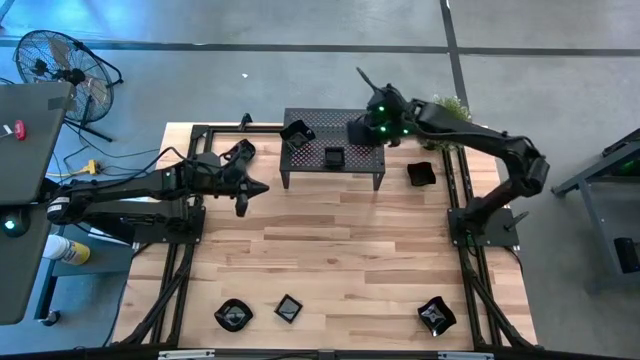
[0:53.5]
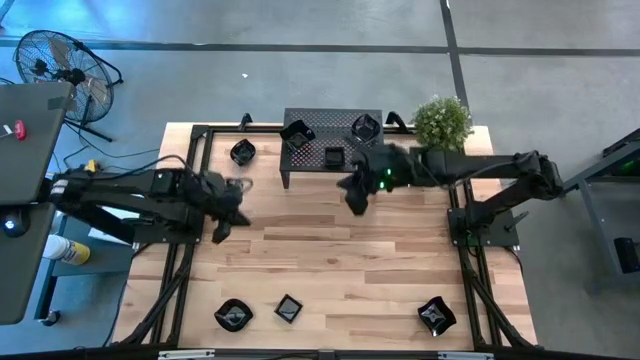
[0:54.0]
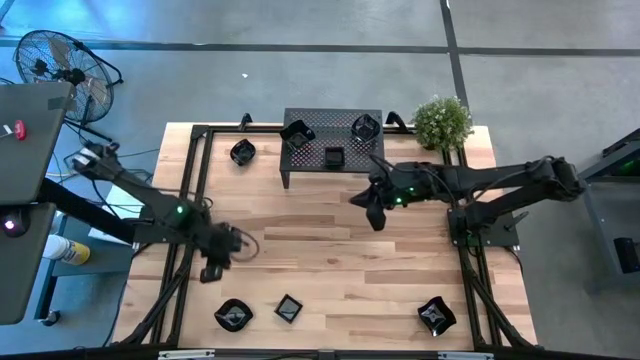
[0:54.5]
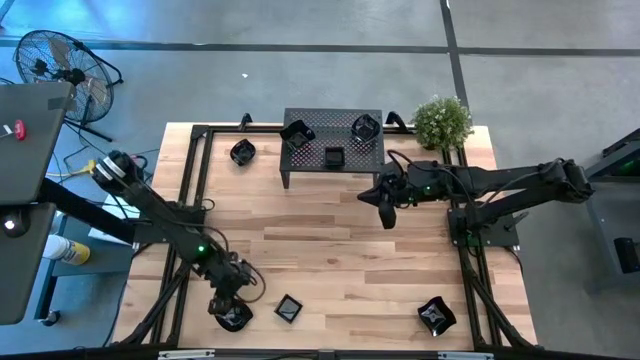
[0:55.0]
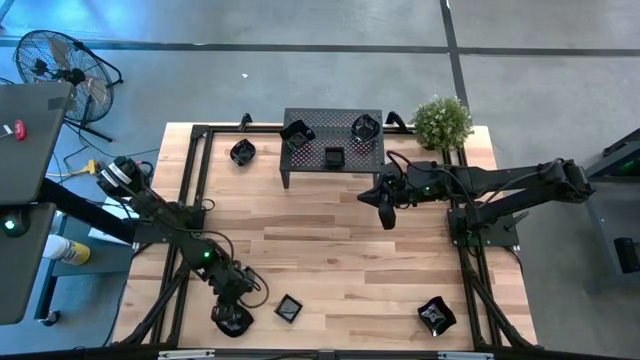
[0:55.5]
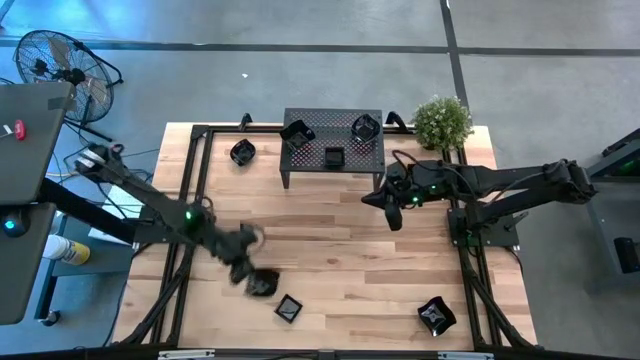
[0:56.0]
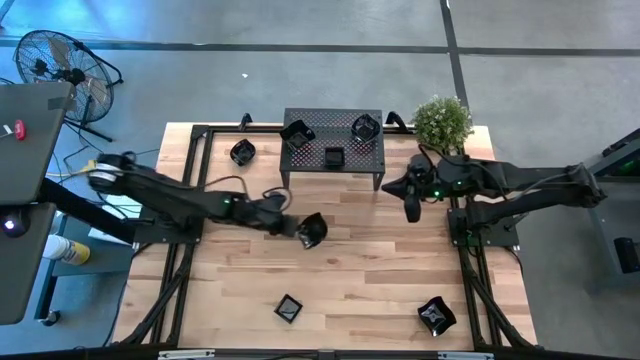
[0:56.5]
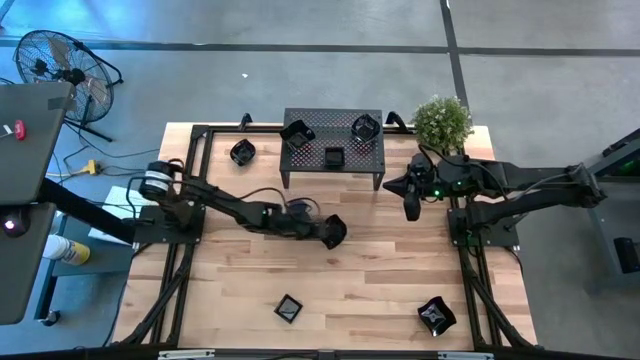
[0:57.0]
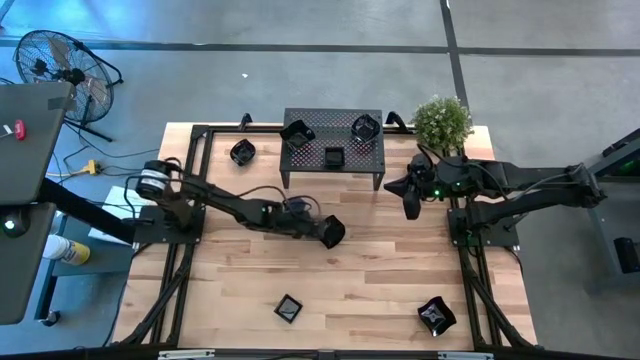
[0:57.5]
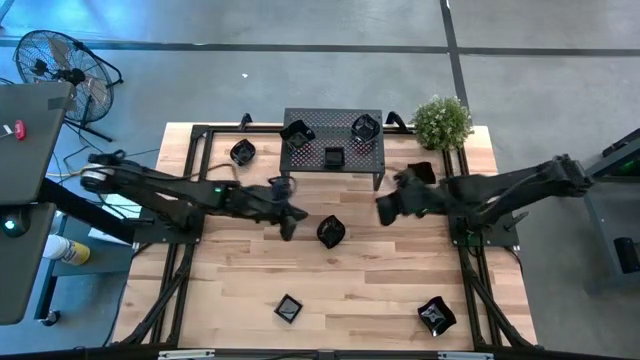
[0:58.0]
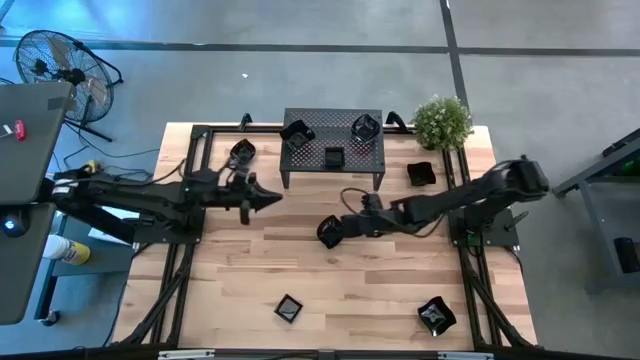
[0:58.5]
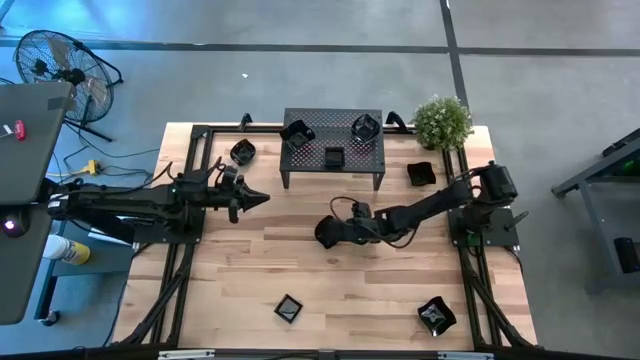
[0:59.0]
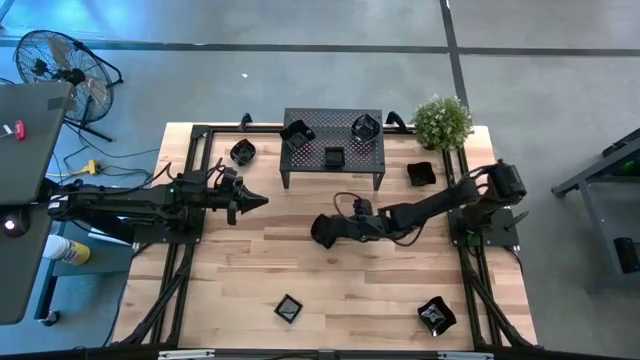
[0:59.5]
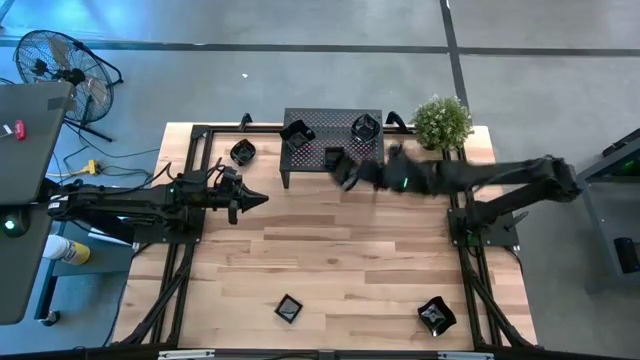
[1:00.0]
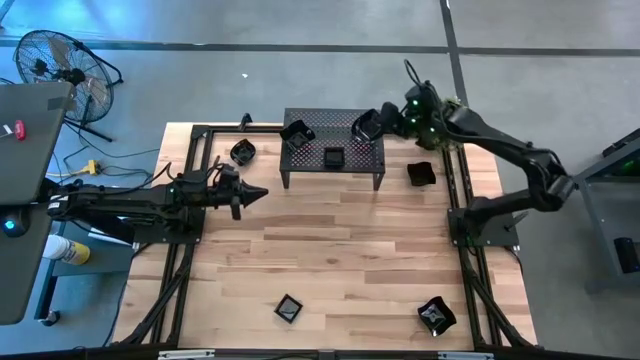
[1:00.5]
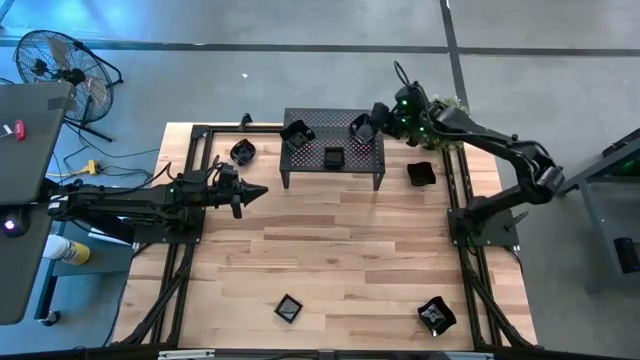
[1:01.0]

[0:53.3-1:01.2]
Task: Pick & Place Mini shaped plates
Stack the black leaf shaped plate on top of the black leaf shaped plate on the shelf

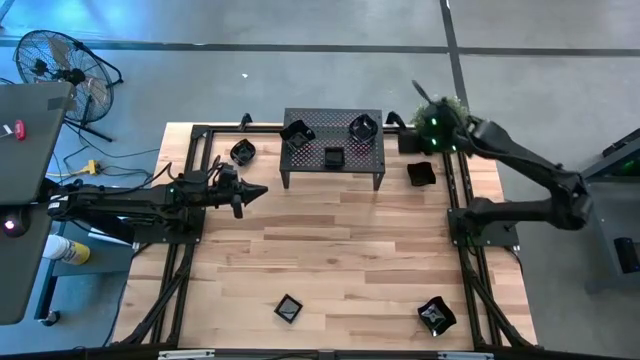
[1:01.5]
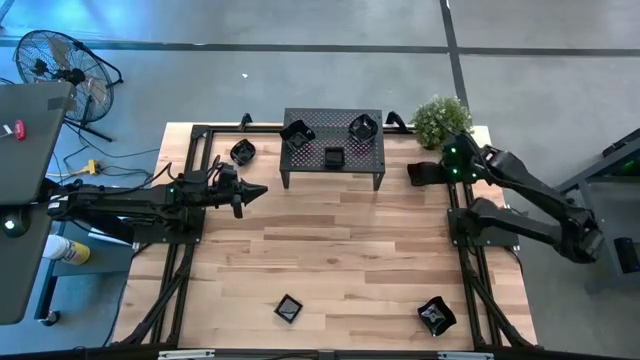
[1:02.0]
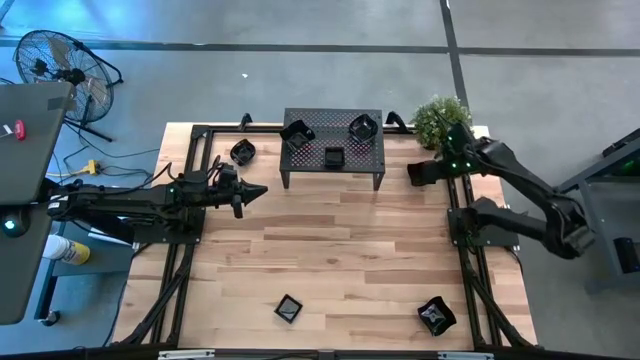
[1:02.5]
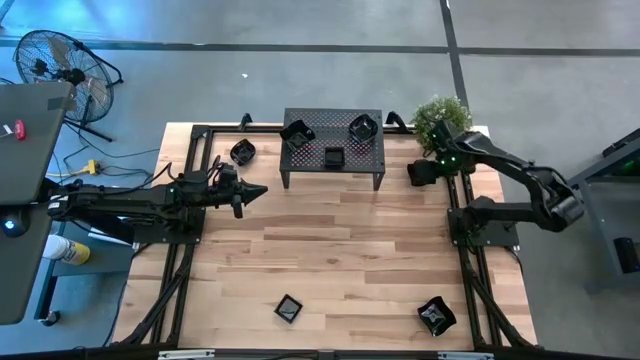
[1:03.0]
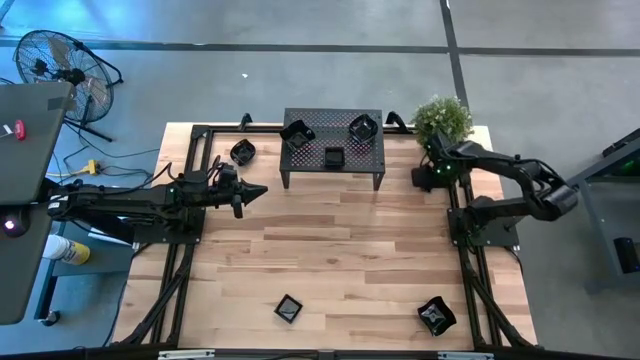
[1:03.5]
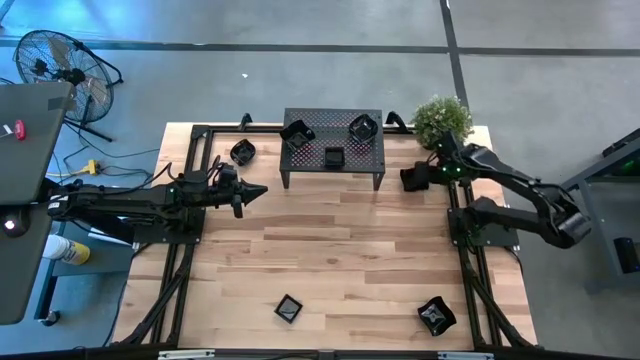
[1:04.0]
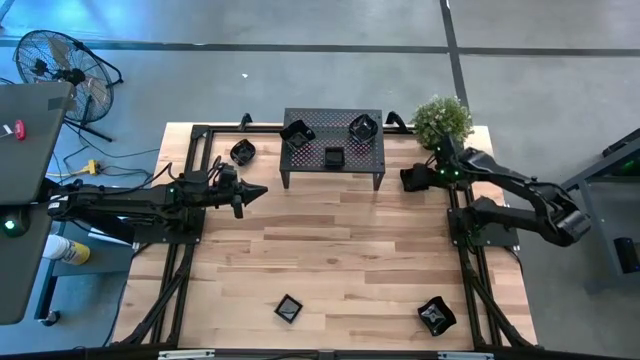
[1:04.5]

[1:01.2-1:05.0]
Stack the black distorted square plate on top of the black distorted square plate on the shelf

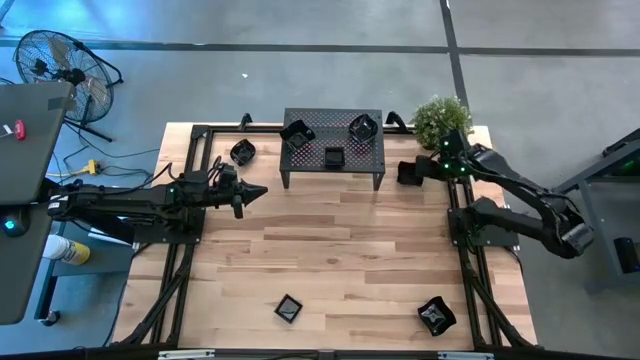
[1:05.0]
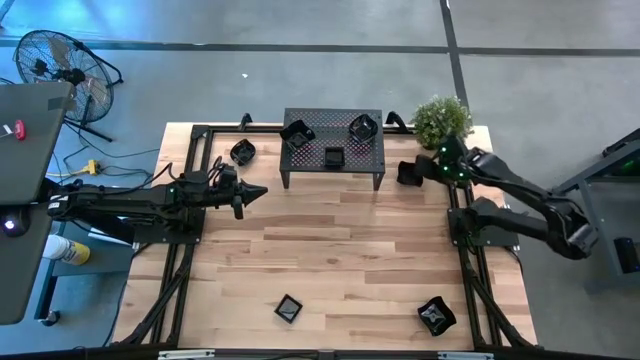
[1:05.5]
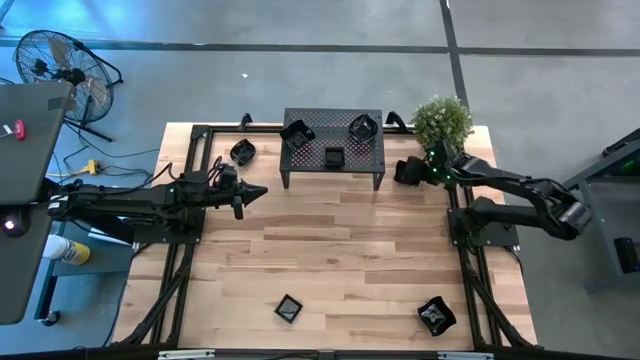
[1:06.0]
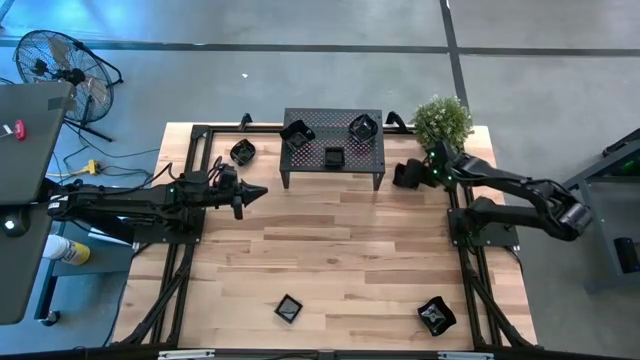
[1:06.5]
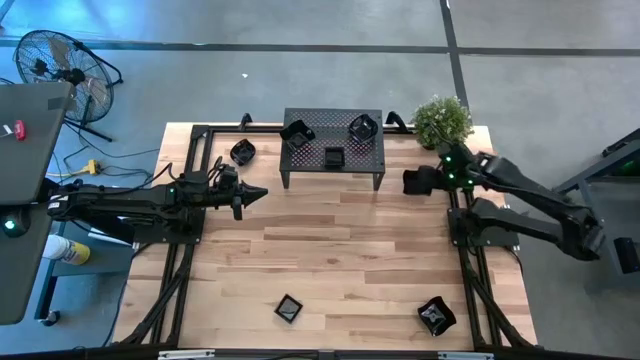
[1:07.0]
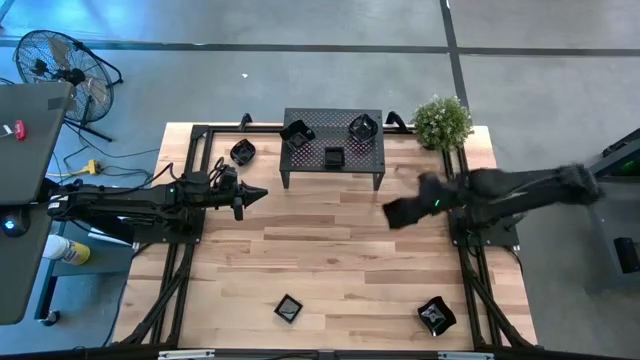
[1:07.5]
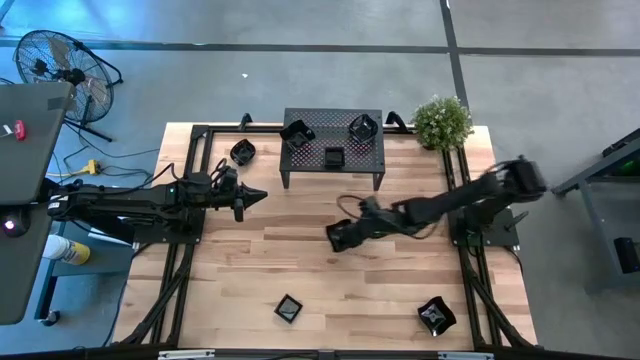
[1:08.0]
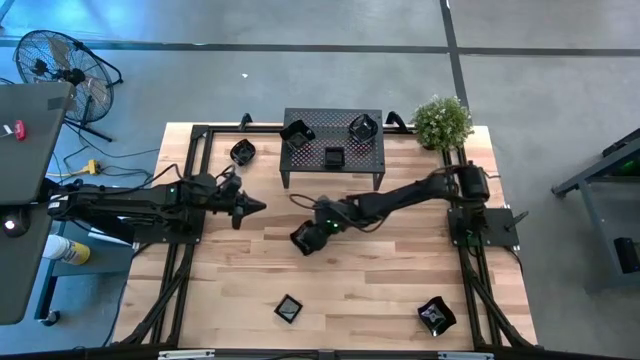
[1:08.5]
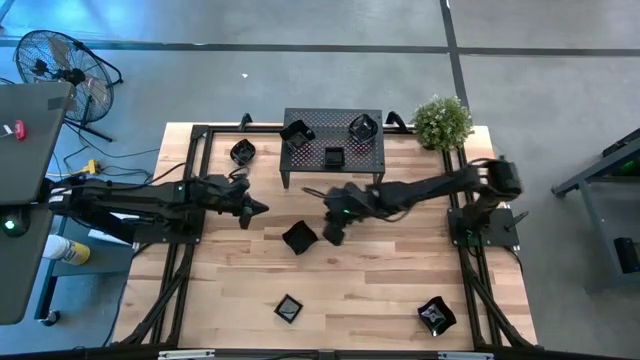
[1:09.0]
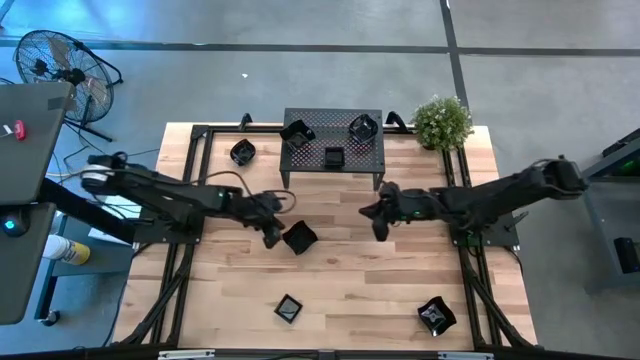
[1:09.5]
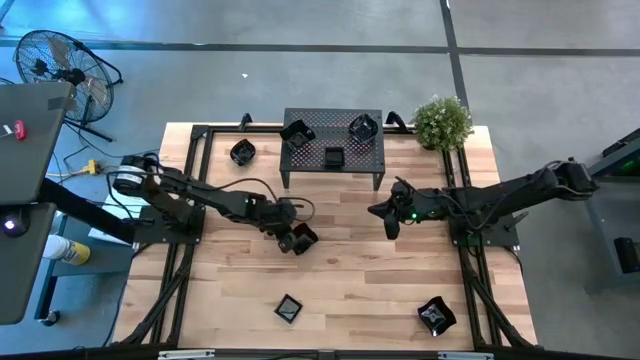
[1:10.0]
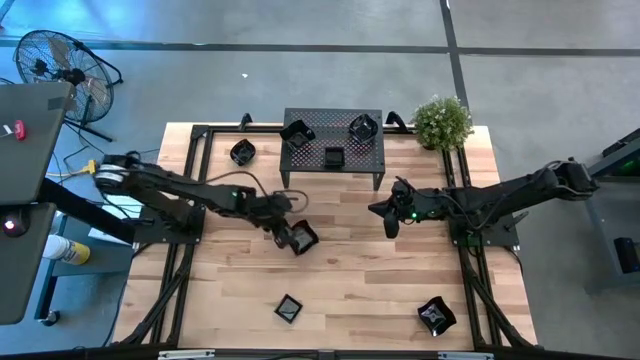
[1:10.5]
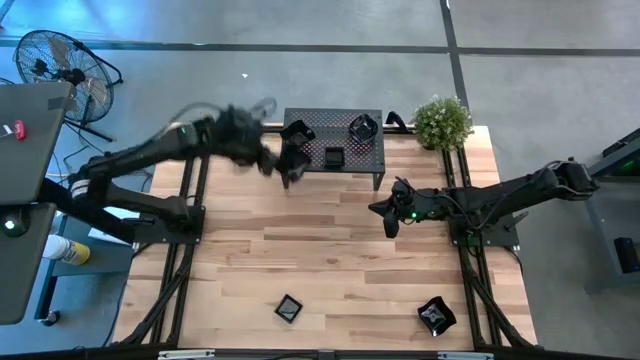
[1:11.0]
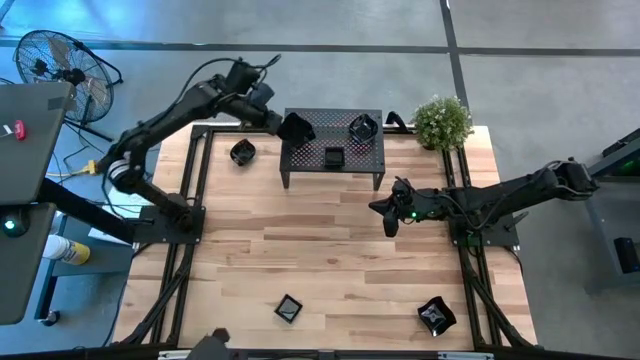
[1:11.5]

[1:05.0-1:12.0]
Stack the black distorted square plate on top of the black distorted square plate on the shelf

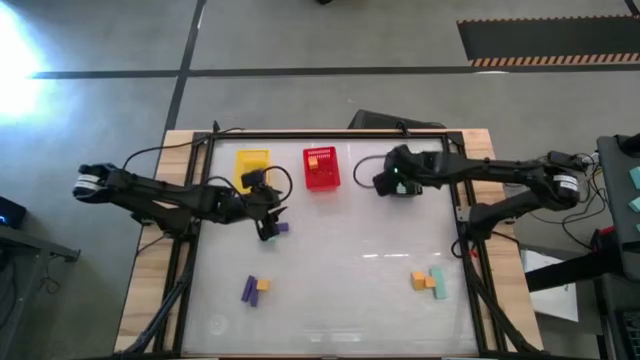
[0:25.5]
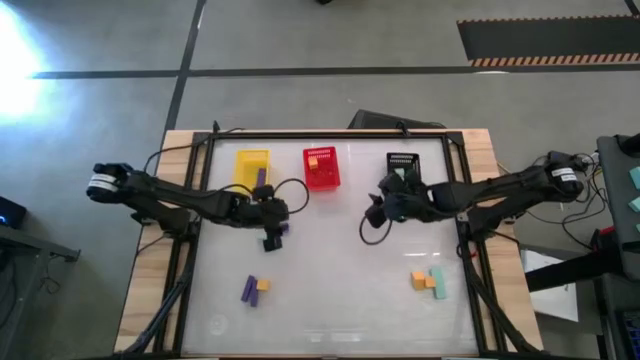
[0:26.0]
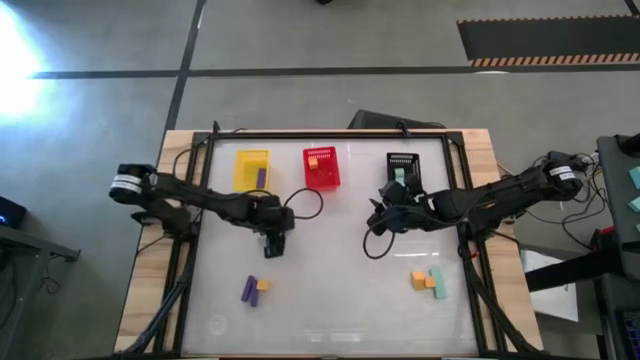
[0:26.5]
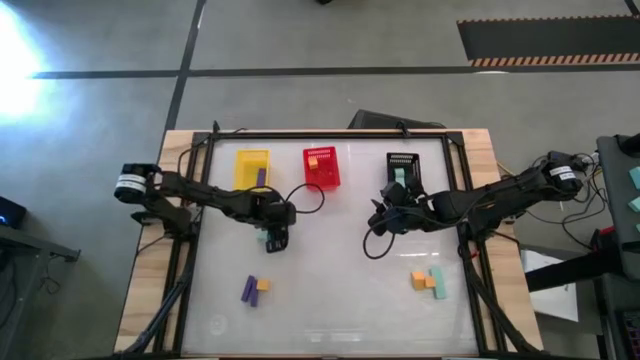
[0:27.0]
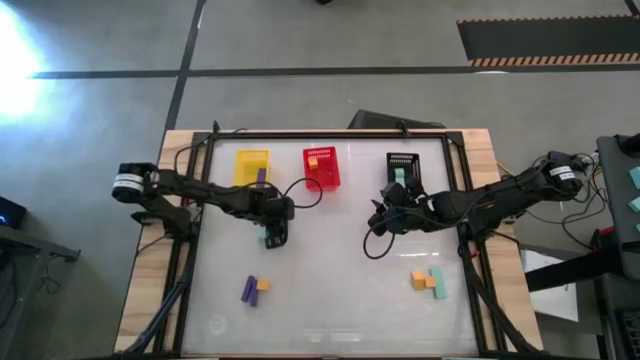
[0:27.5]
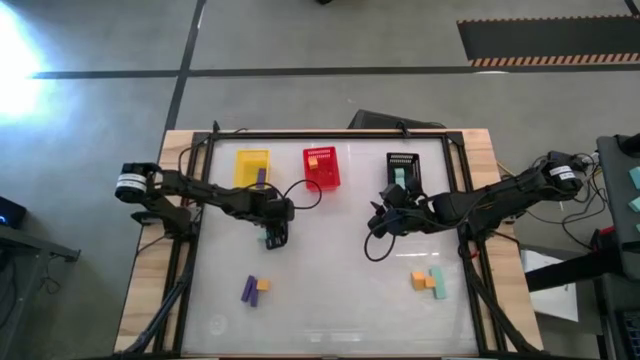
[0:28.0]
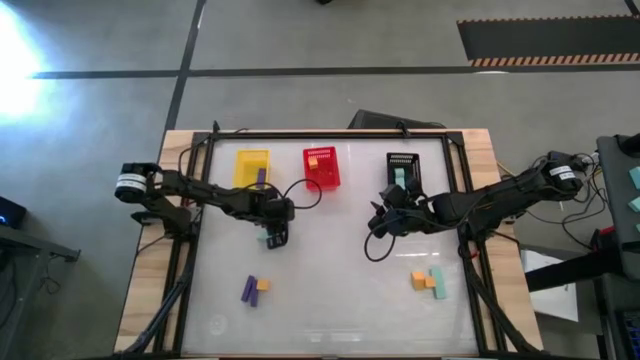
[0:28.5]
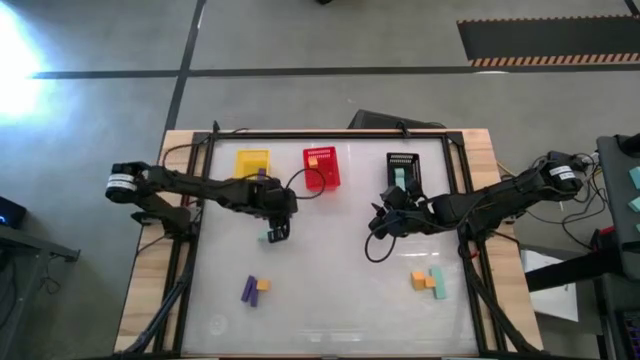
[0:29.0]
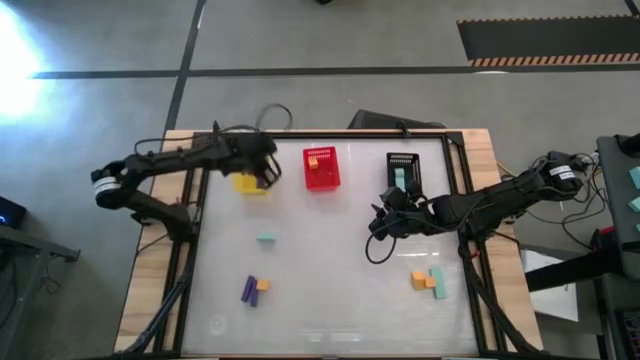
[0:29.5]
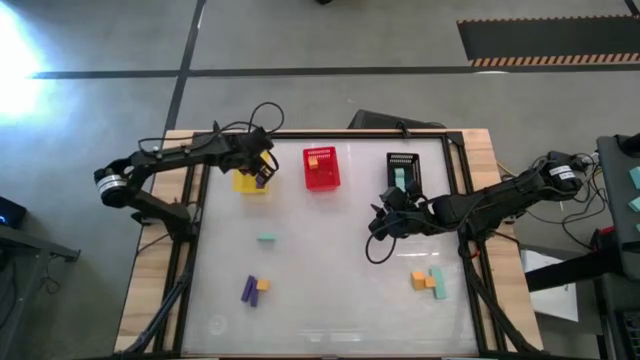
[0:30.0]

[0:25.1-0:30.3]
Task: Sort & place blocks by color
Put the purple block into the yellow bin
